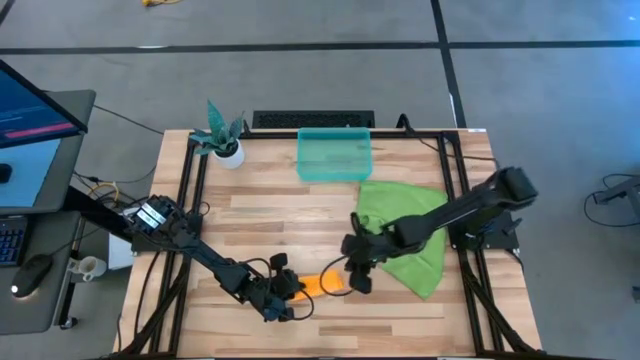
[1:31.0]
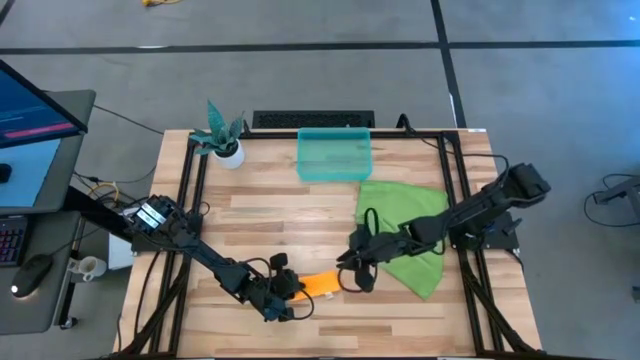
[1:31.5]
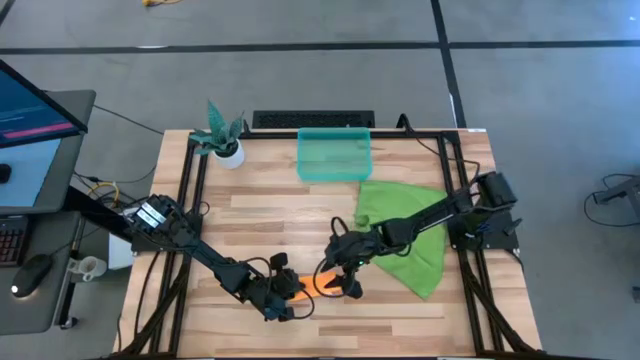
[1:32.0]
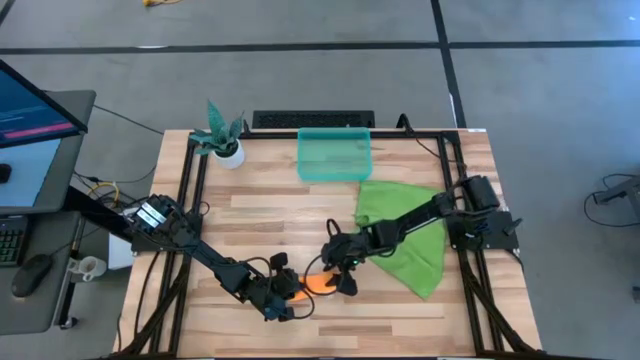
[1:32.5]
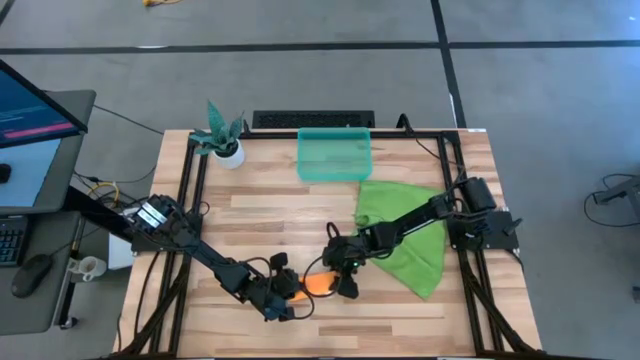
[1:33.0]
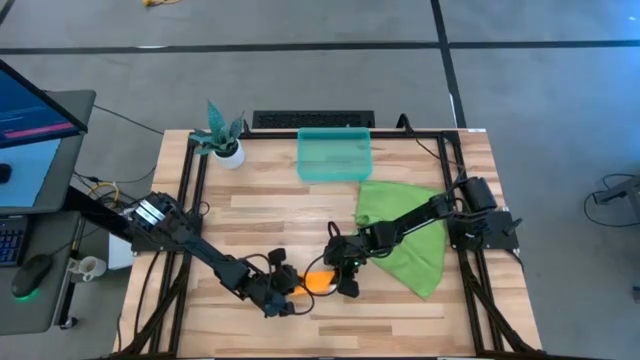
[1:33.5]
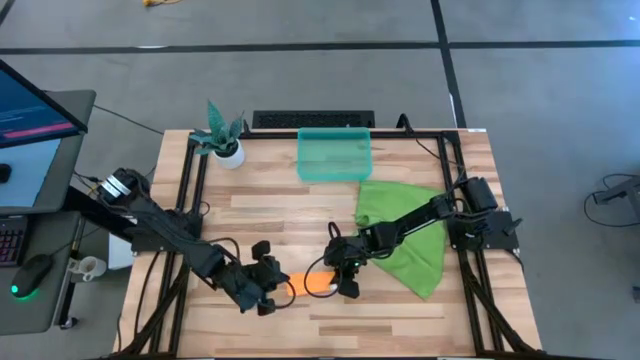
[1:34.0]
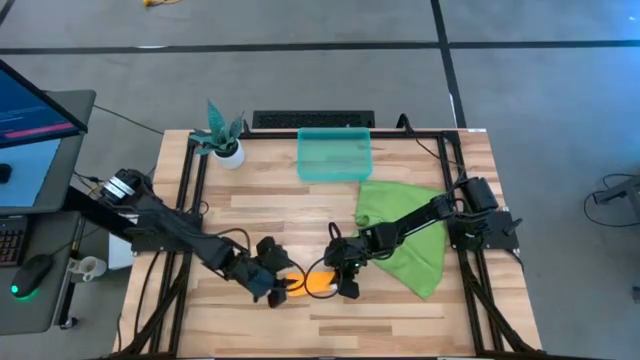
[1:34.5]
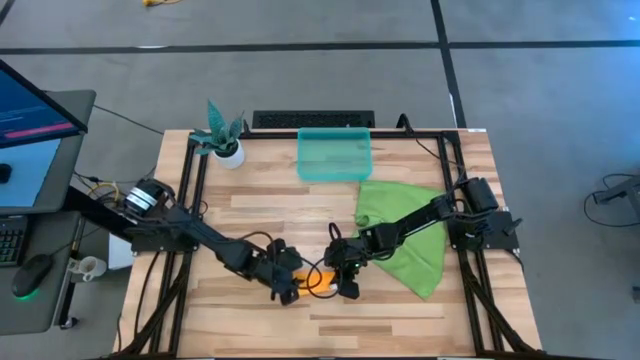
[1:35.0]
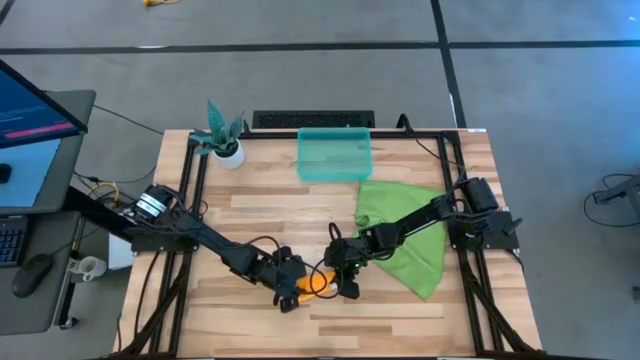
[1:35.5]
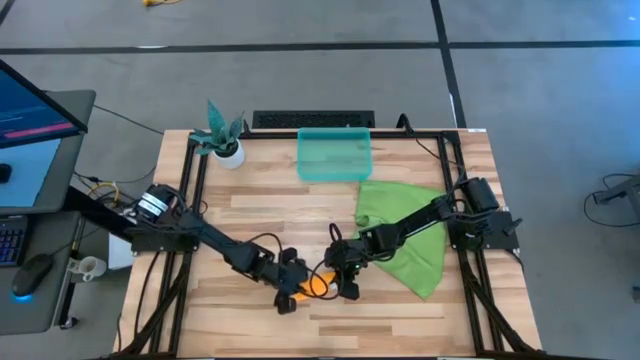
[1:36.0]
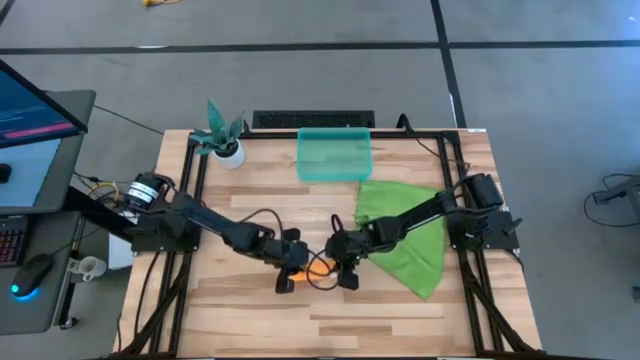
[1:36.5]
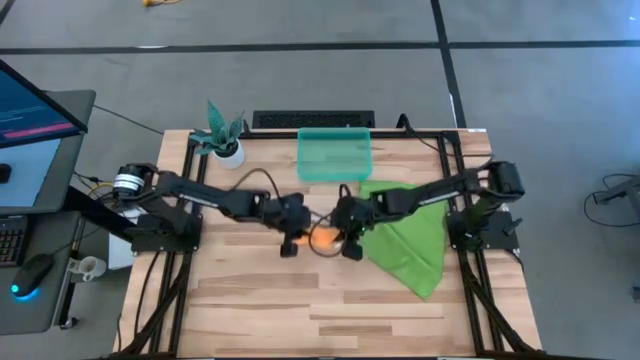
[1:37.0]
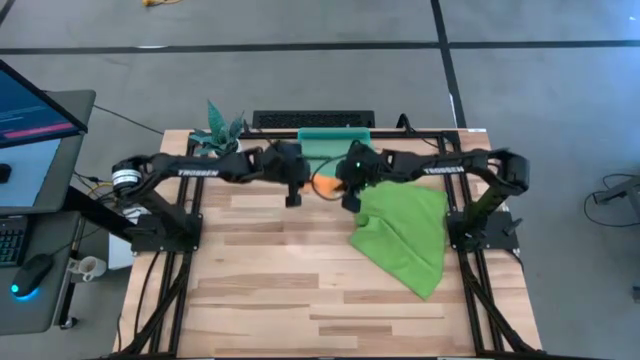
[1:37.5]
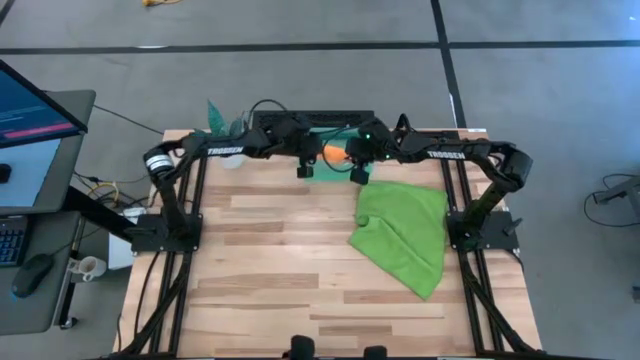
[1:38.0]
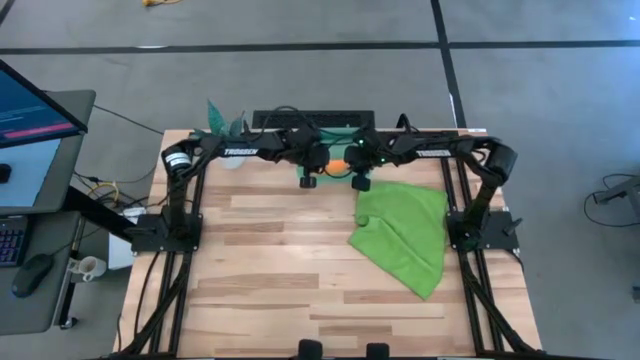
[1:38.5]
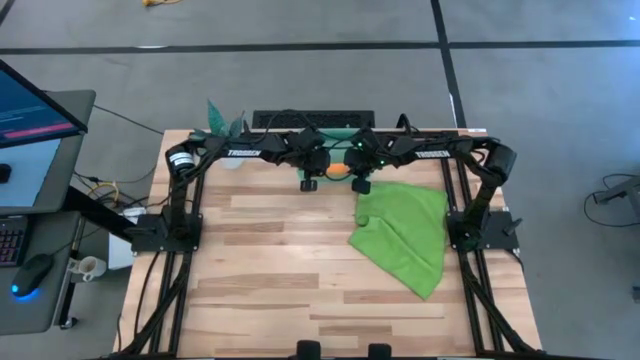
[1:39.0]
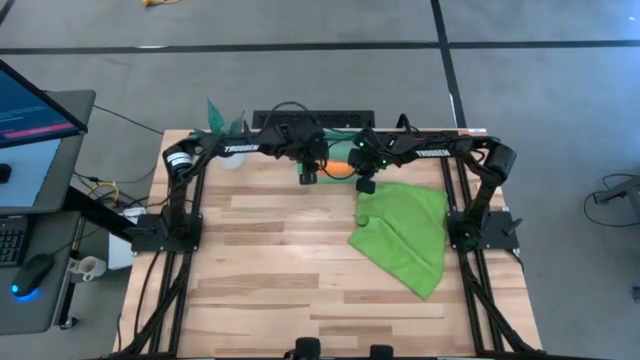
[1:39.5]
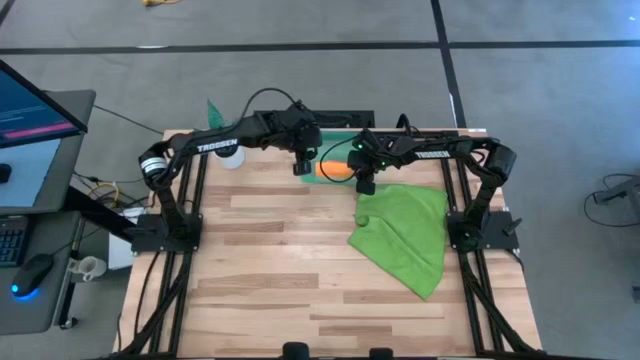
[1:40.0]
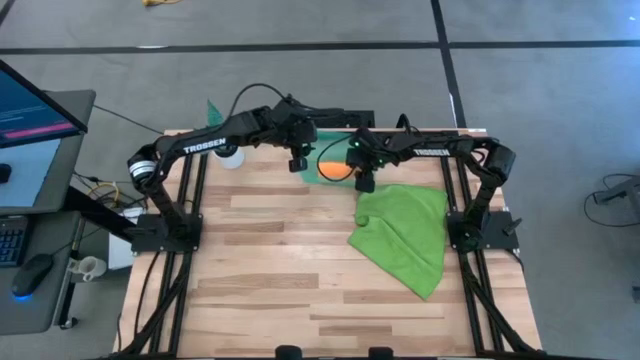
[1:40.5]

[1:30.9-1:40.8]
Task: Roll microfiber towels into tight, uniform cylinder then place into a basket
Put the orange towel into the blue bin

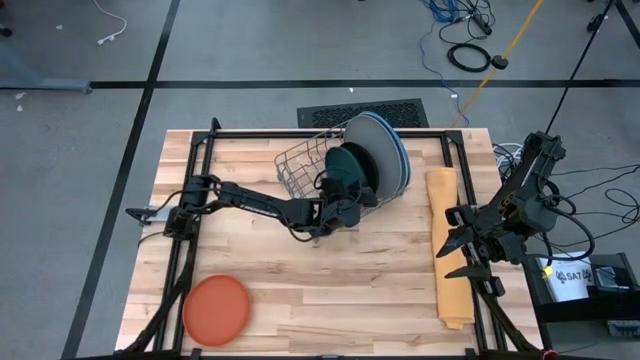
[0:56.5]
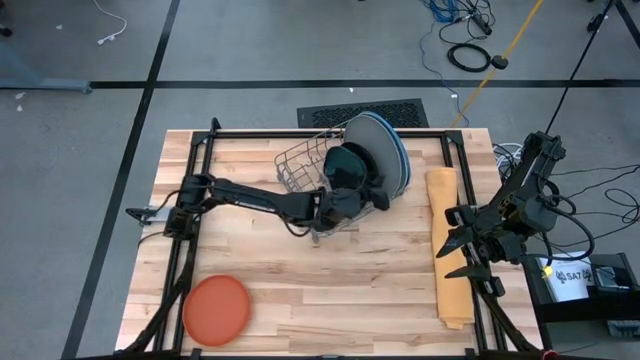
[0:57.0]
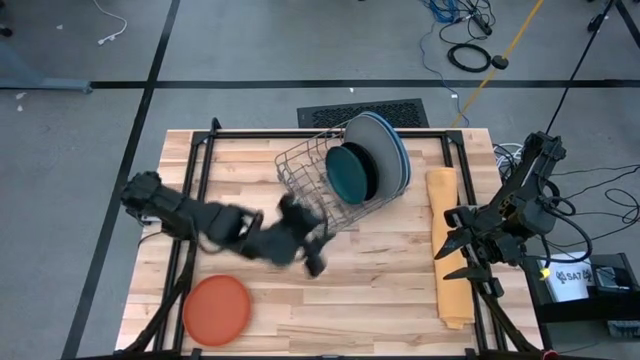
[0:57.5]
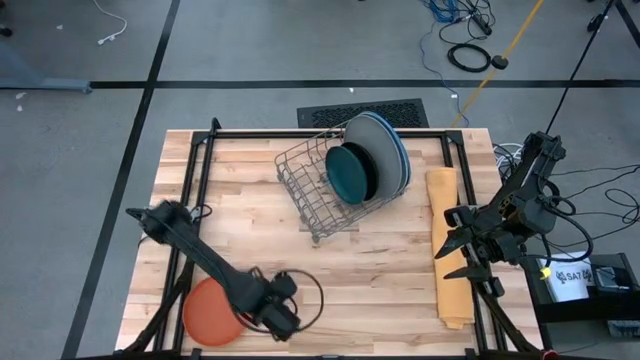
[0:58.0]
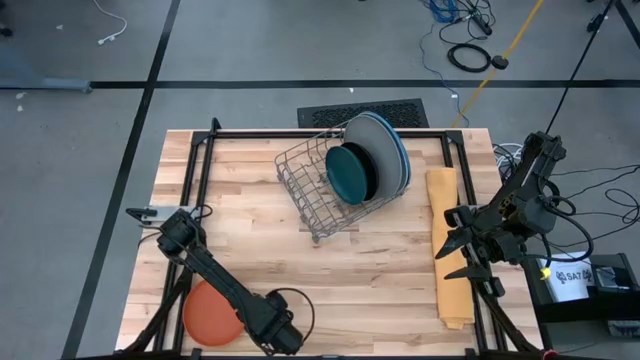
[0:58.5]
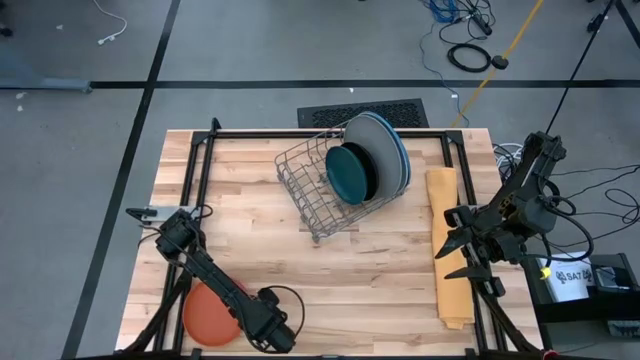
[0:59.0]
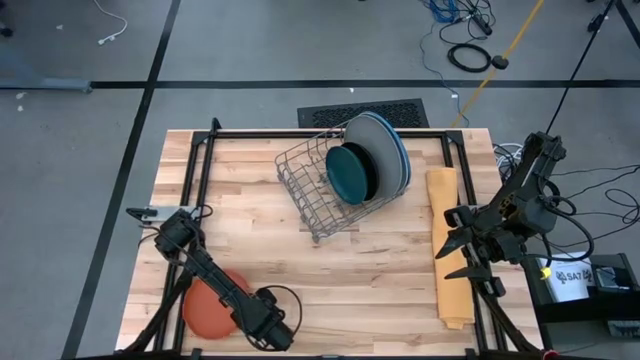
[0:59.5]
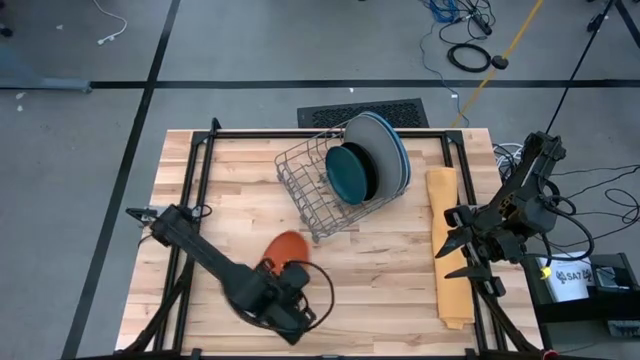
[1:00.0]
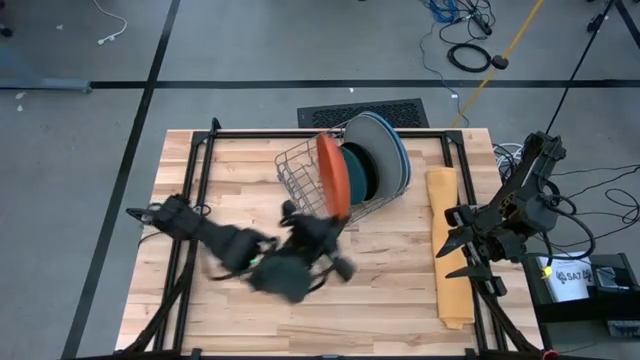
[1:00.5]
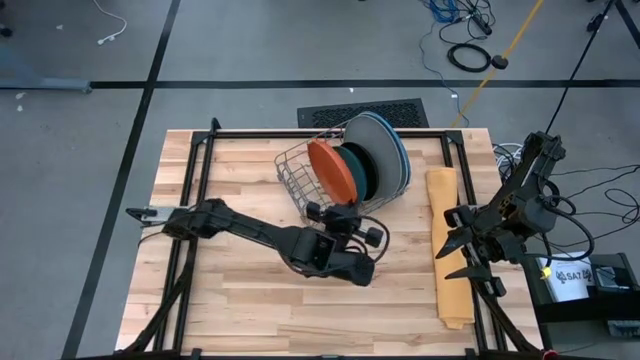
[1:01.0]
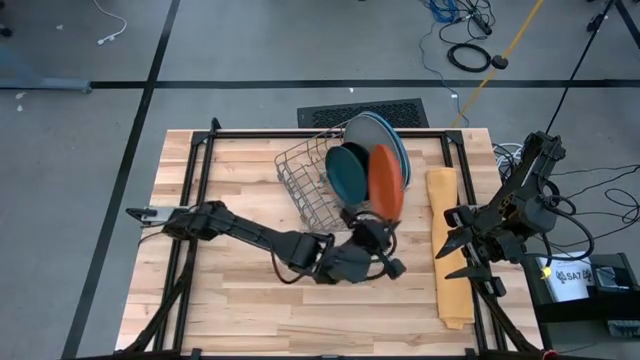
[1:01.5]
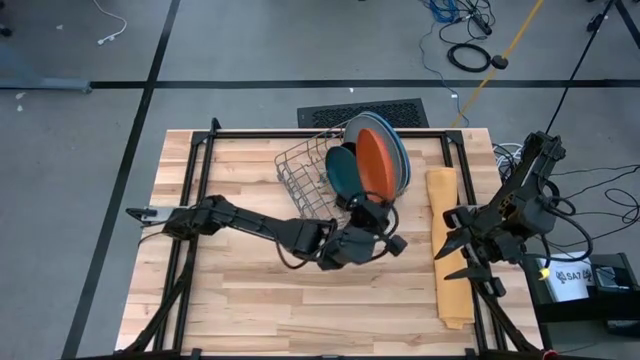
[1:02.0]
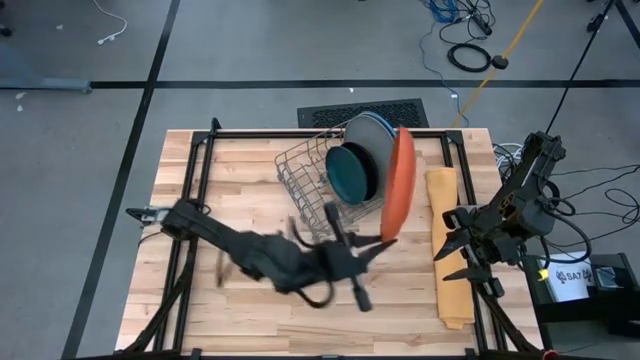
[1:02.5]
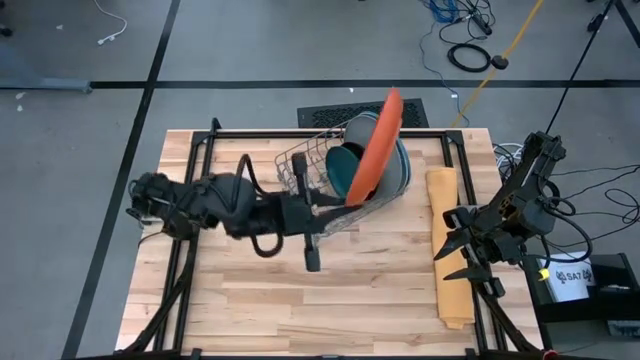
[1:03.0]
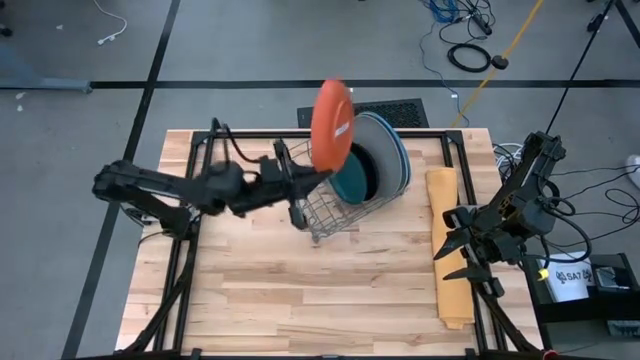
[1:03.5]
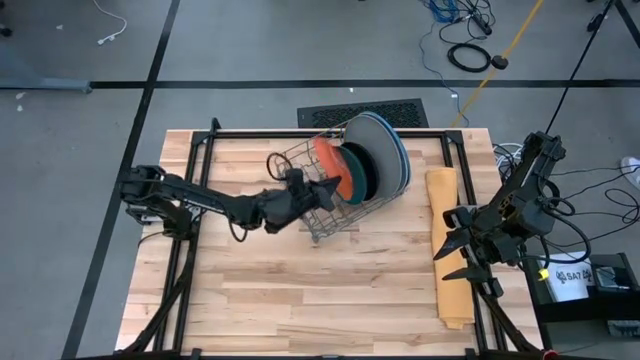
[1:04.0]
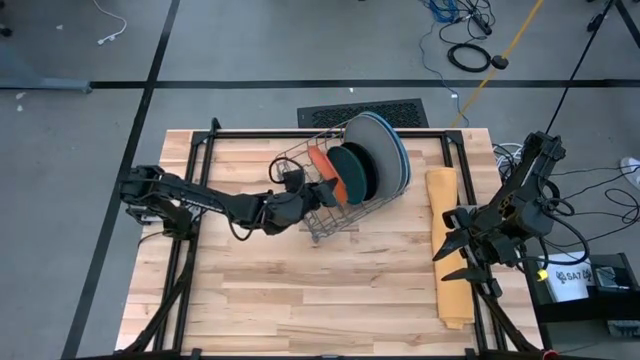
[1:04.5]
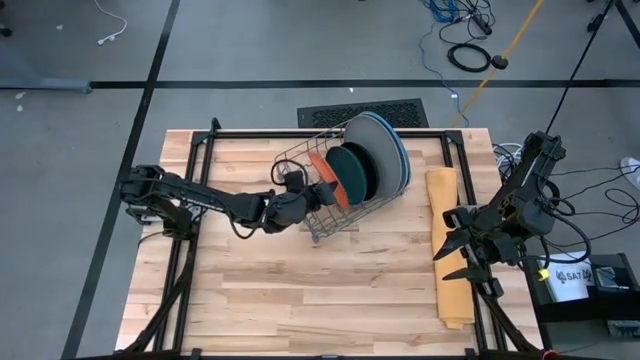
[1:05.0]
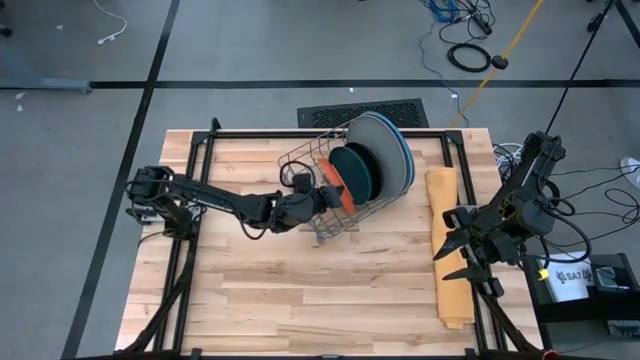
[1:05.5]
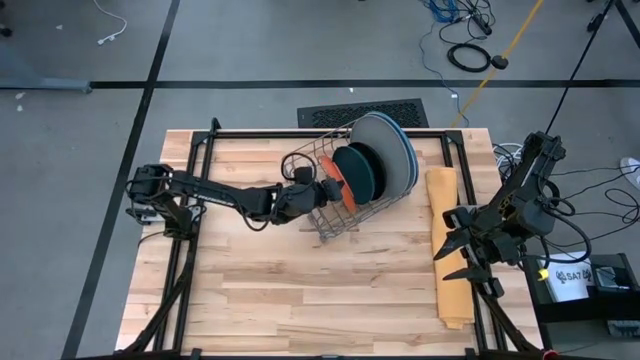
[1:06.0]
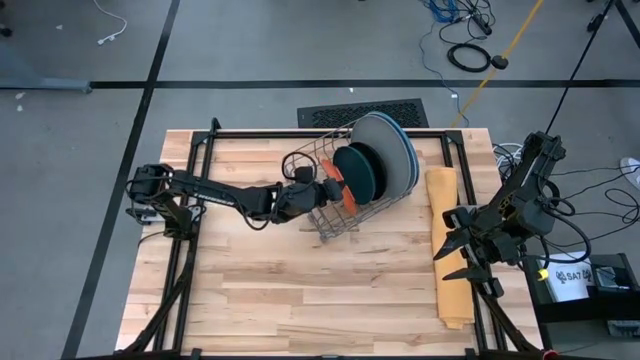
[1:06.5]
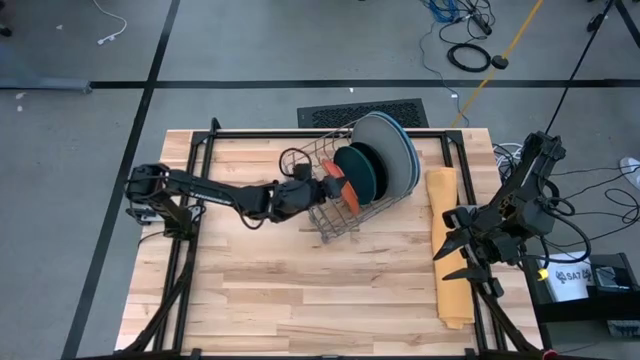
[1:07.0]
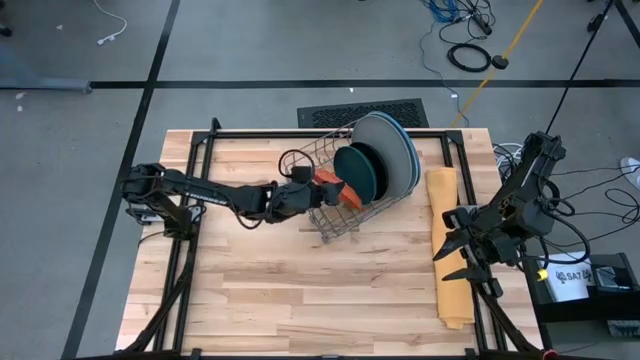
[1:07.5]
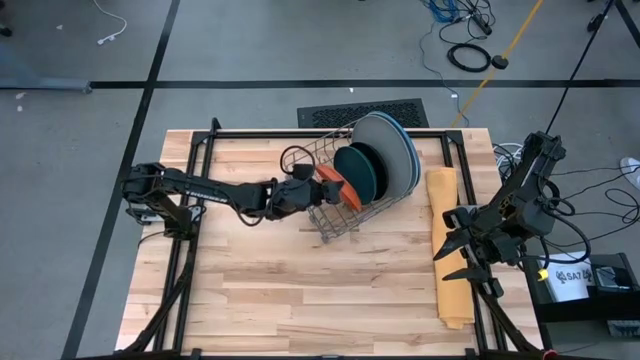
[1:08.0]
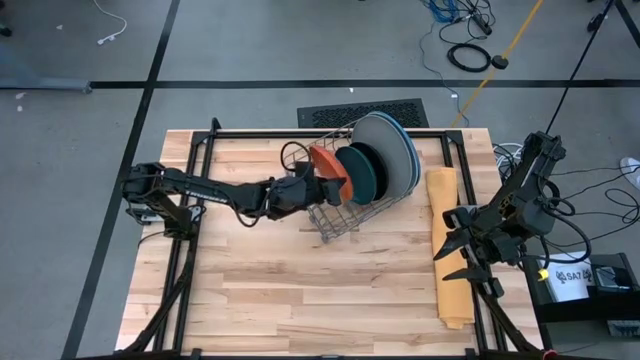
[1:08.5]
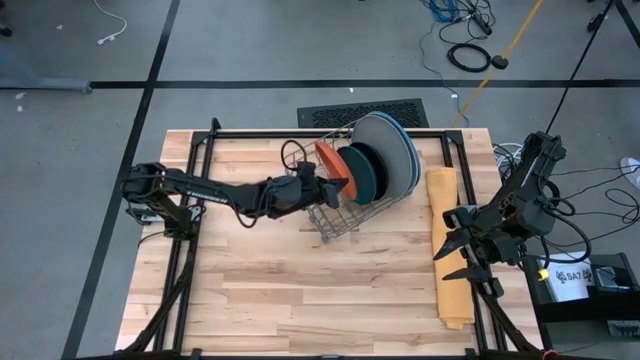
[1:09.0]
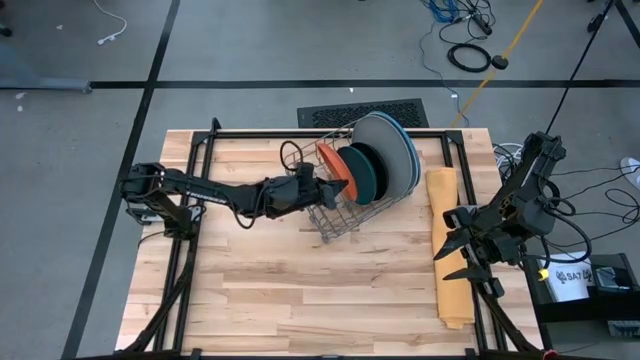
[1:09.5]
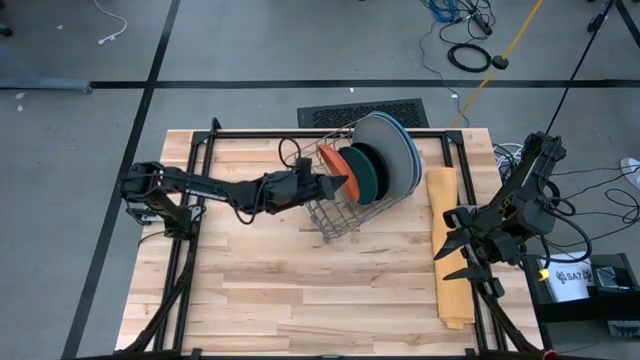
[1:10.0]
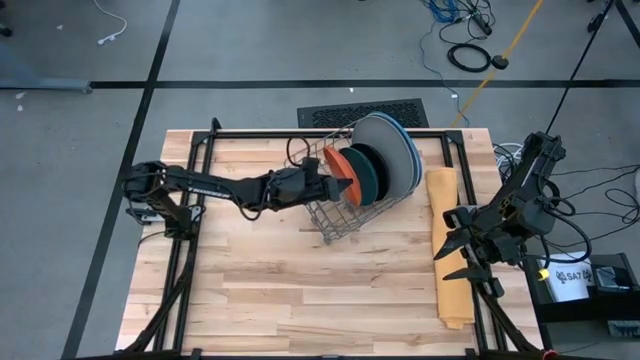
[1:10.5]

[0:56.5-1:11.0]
Task: Sort dishes
Put the orange plate into the dish rack
